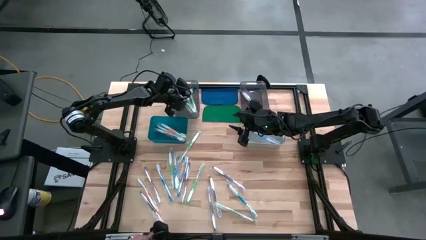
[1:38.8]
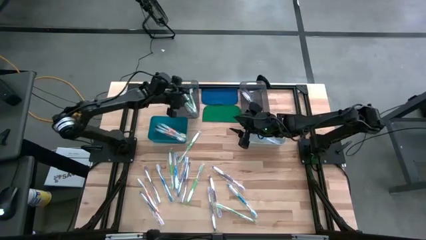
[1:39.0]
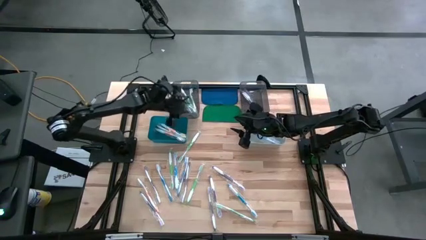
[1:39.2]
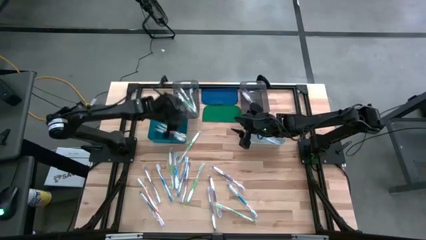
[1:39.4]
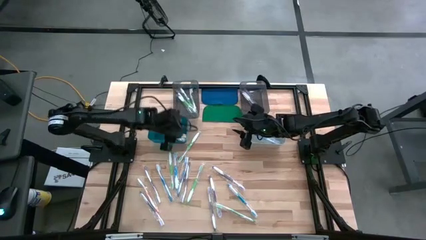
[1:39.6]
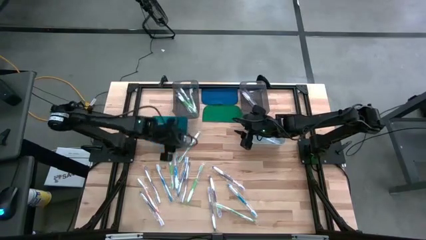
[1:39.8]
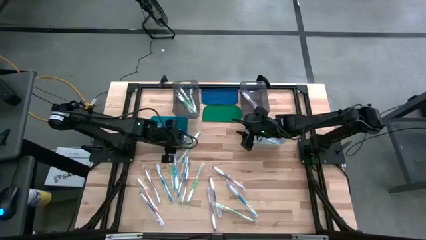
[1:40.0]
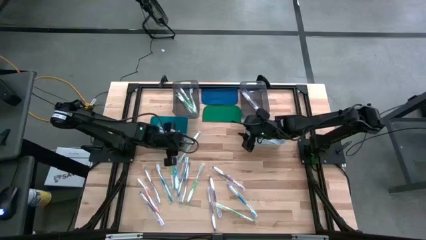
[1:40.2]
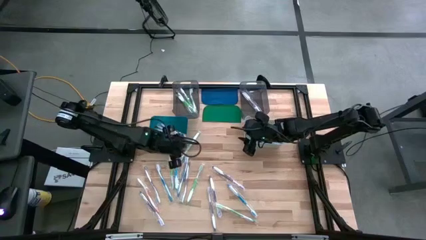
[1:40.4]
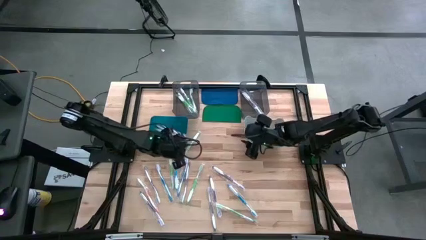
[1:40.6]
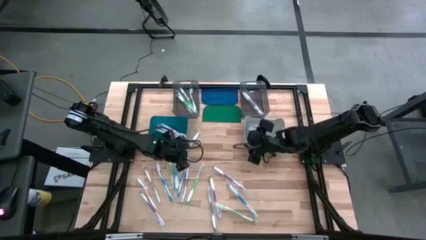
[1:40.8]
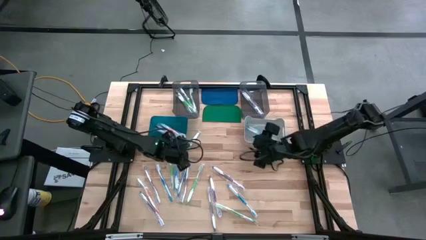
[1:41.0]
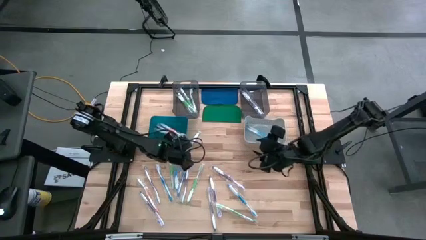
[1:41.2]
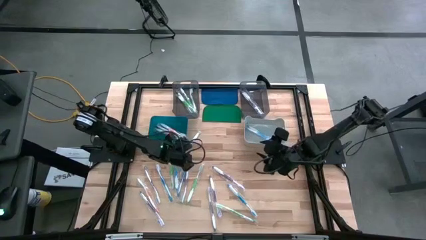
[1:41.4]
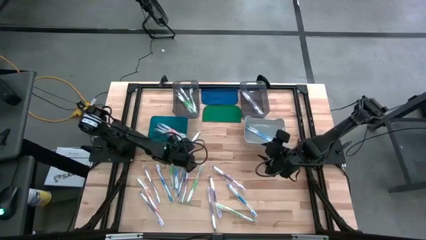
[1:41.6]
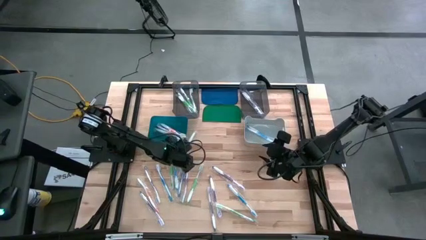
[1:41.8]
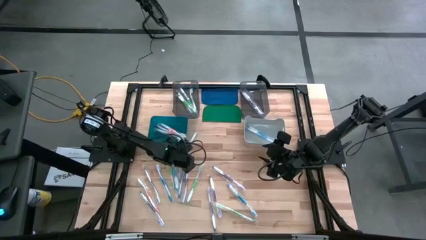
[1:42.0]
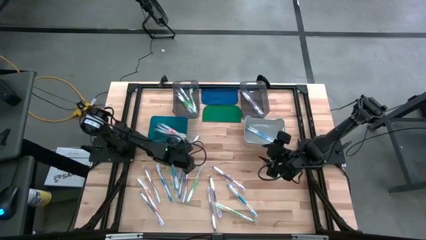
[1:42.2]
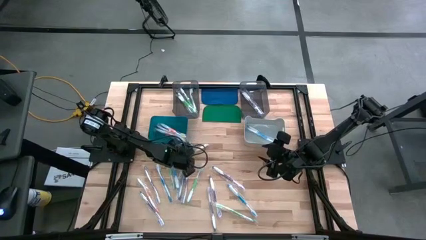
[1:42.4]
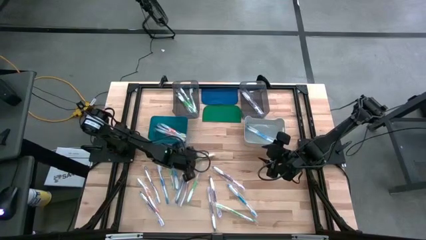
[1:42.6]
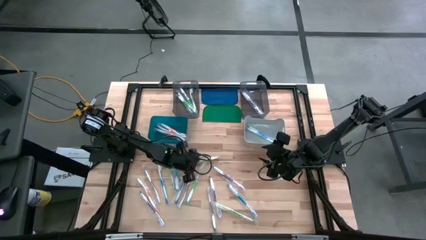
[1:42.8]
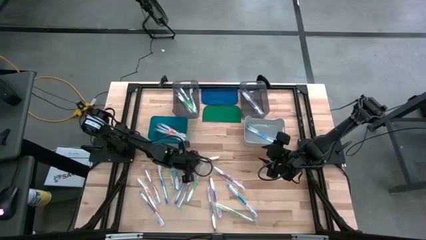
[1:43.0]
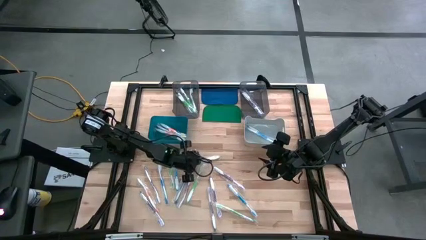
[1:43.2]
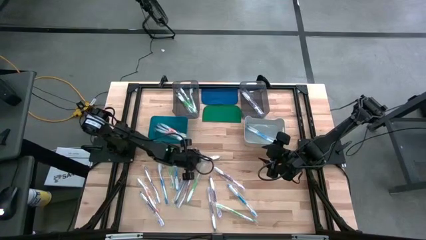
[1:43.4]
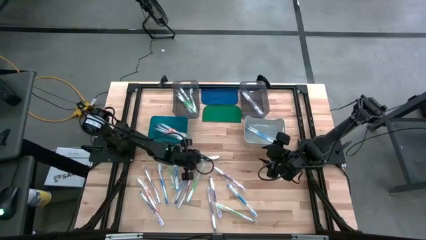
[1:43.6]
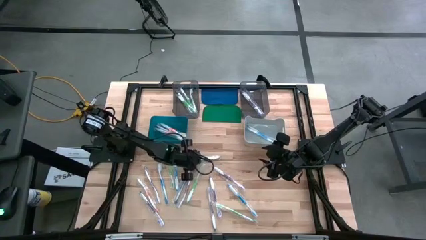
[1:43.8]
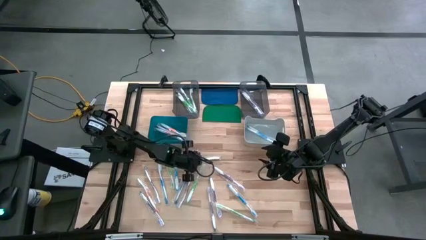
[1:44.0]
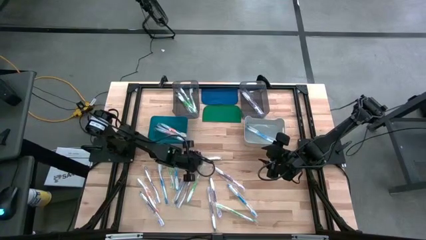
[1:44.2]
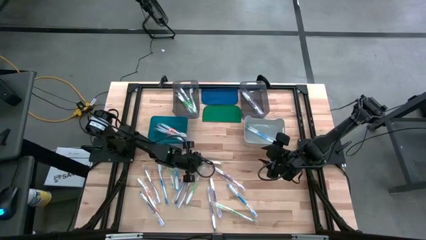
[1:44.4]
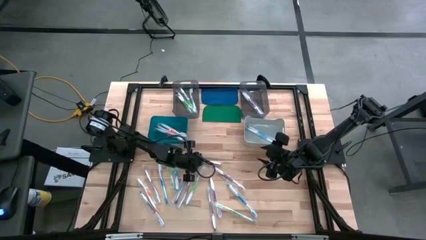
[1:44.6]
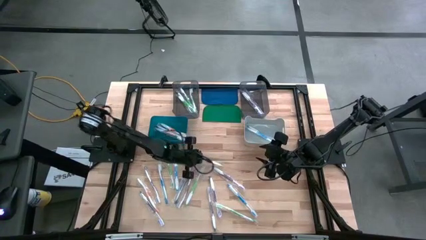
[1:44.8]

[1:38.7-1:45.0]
Task: Pick & Place Toothbrushes
Put the green toothbrush into the left black bin

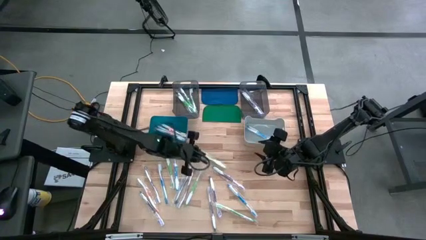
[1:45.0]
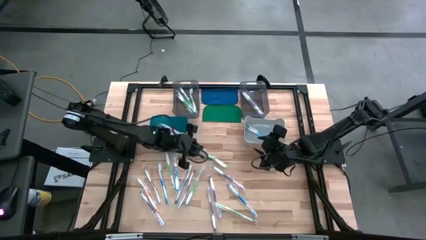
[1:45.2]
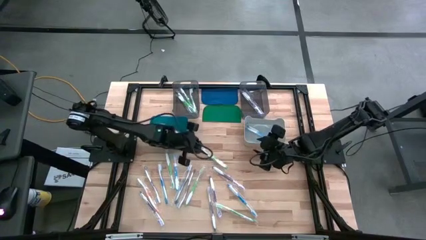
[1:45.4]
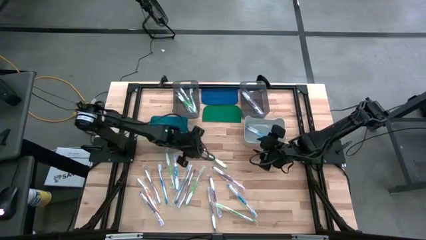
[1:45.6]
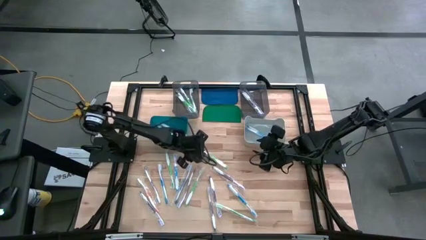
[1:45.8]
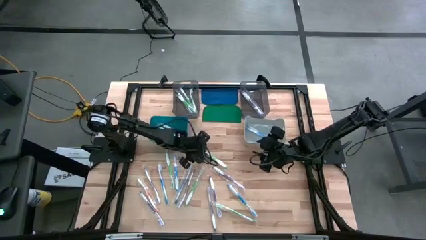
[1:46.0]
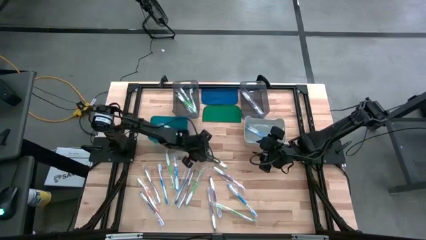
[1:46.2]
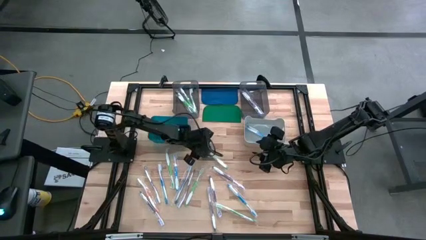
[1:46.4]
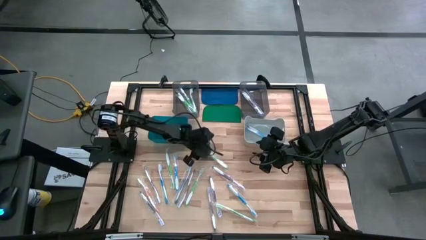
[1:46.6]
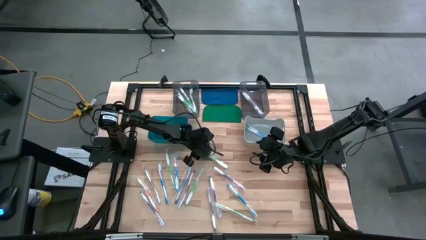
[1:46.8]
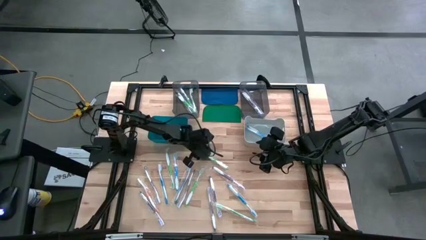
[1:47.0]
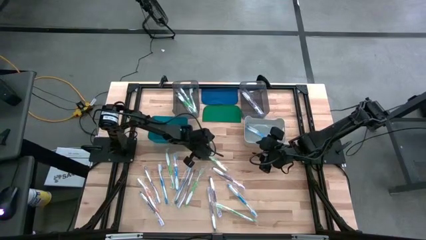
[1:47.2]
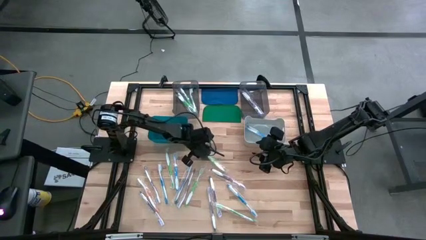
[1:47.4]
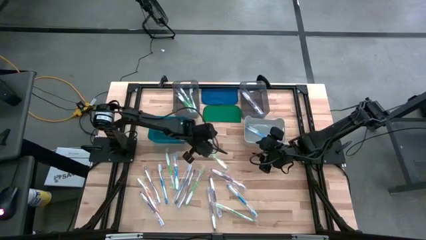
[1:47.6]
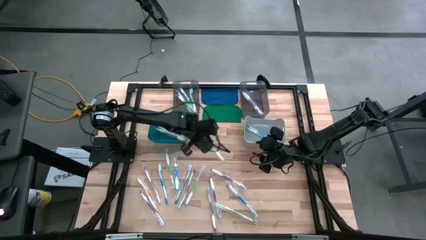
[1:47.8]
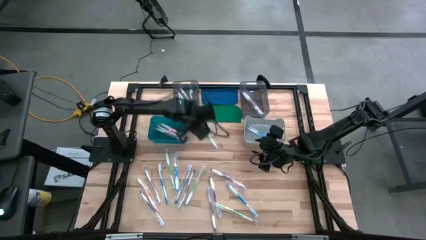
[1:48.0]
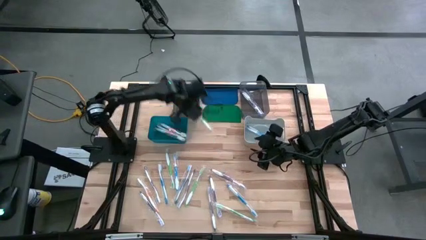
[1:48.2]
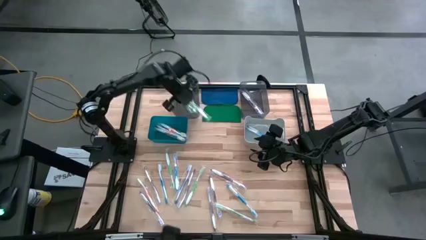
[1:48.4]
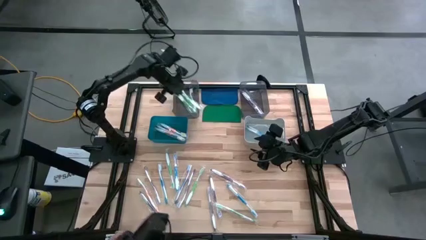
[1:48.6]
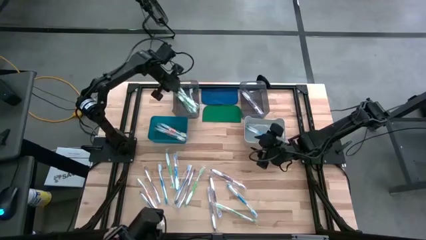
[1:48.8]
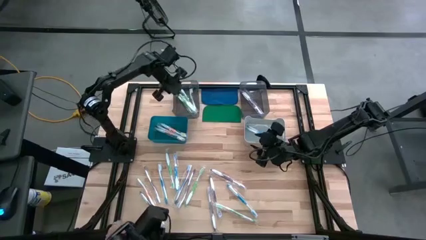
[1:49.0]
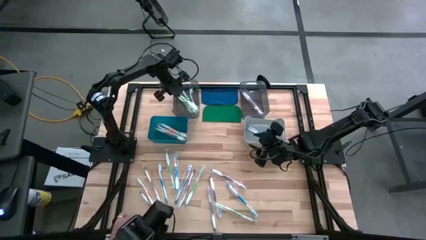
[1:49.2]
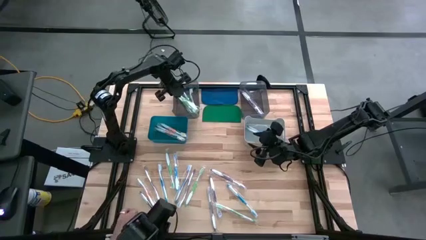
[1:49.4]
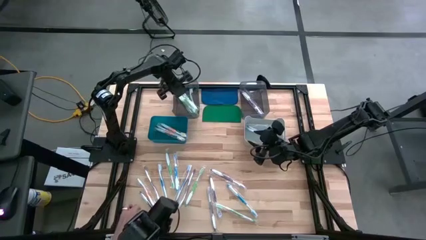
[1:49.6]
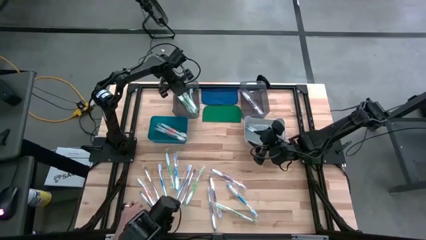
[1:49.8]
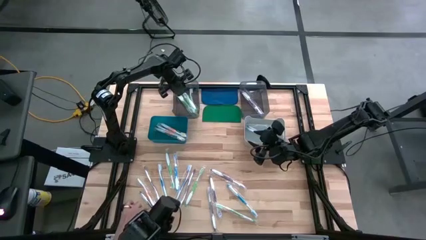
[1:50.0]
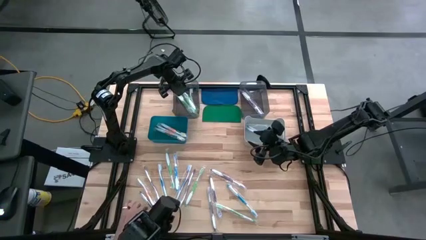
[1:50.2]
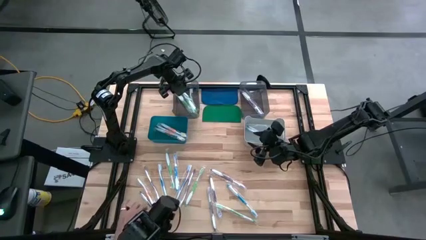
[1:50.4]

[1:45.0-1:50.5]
Put the green toothbrush into the left black bin

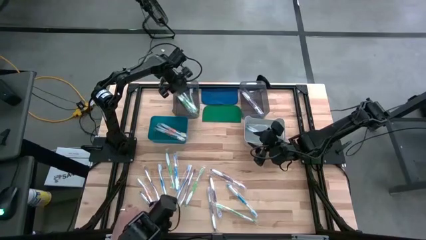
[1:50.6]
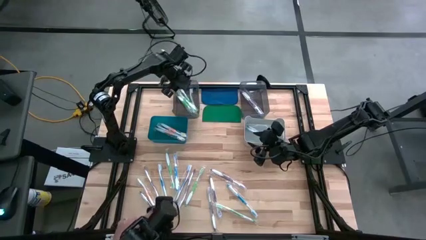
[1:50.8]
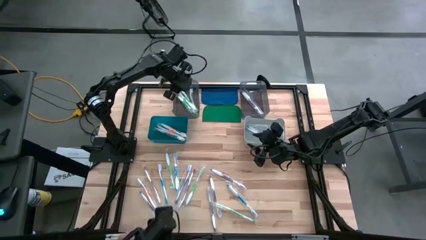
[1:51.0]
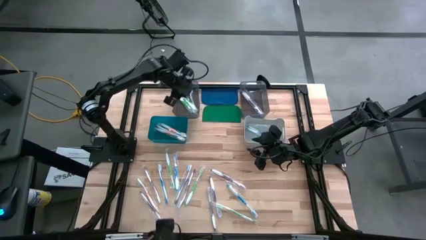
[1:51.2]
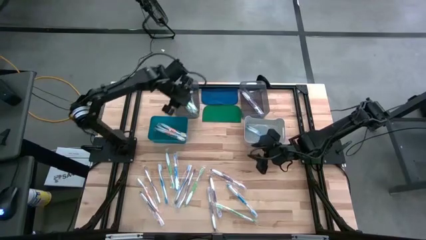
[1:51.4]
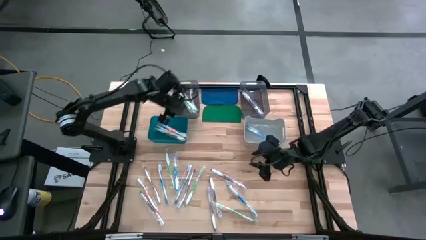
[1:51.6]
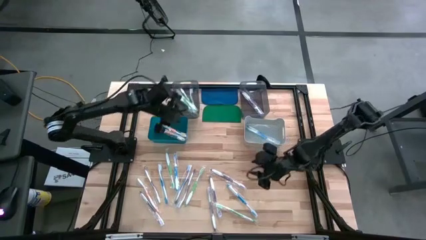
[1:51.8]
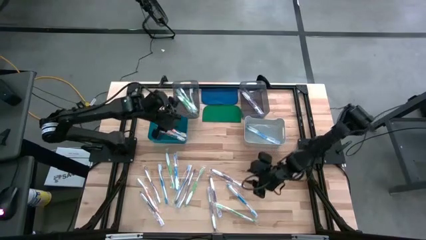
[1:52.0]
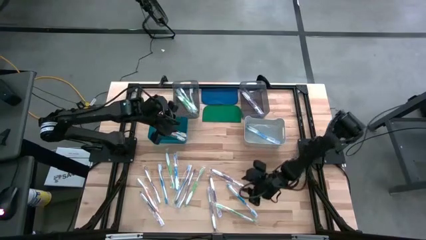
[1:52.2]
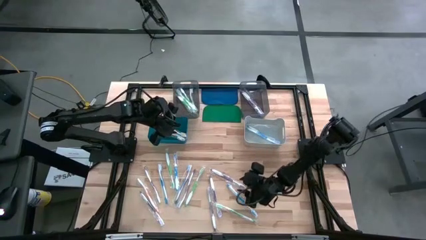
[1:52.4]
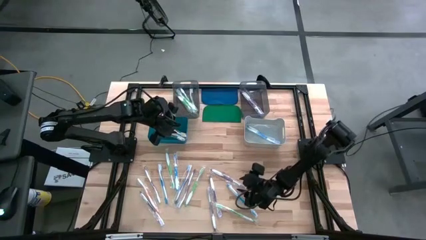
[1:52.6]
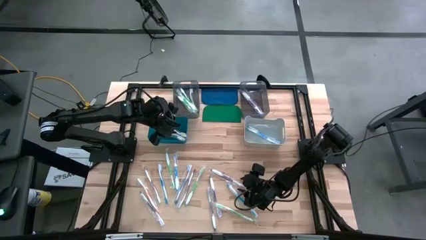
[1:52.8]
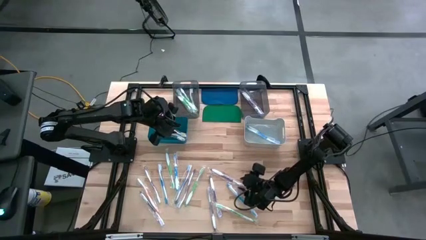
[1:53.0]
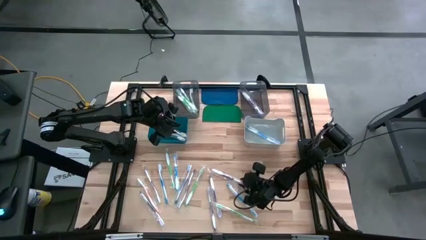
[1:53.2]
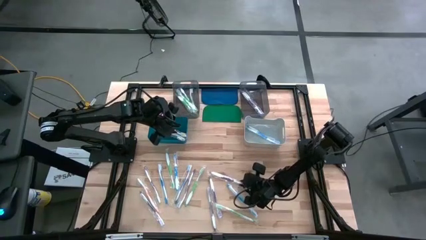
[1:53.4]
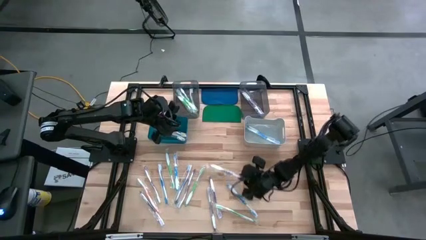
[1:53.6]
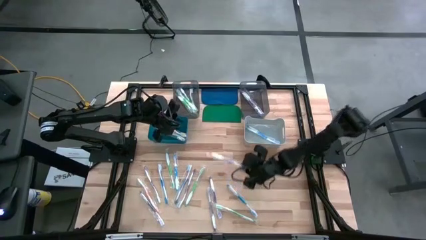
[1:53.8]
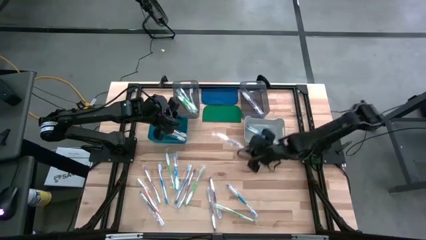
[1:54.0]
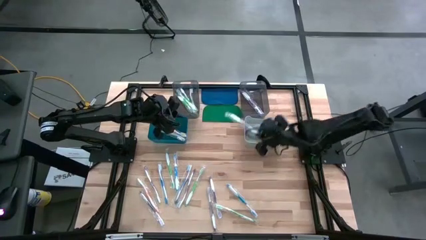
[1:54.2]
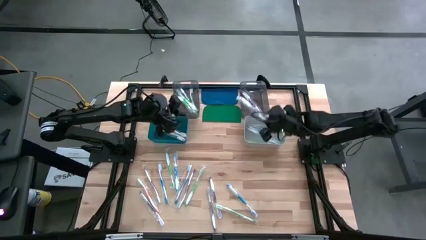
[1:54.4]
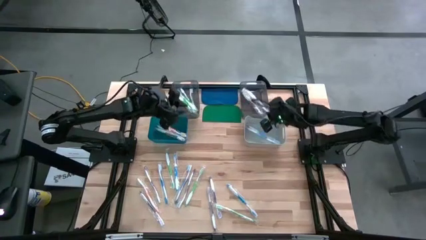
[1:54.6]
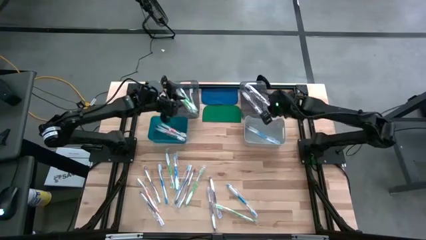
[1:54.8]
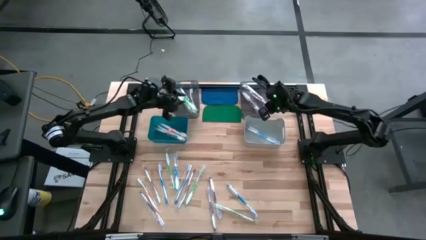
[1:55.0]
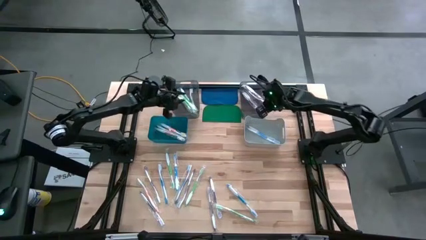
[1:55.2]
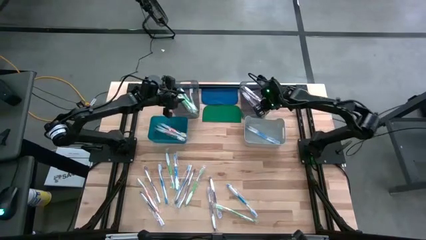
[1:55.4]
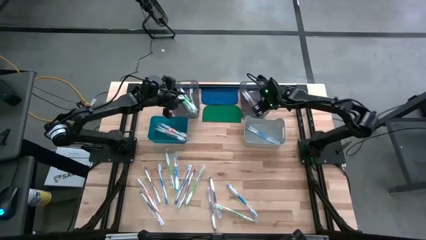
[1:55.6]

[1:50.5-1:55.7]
Put the violet toothbrush into the right black bin
